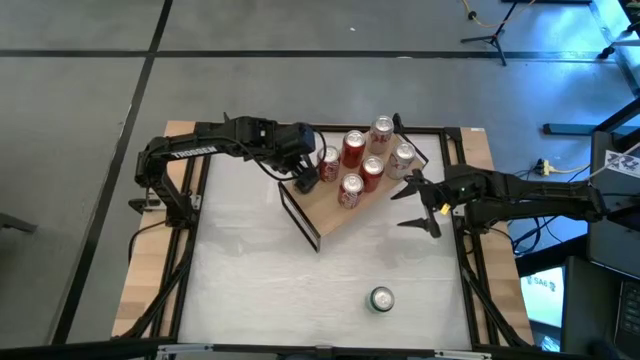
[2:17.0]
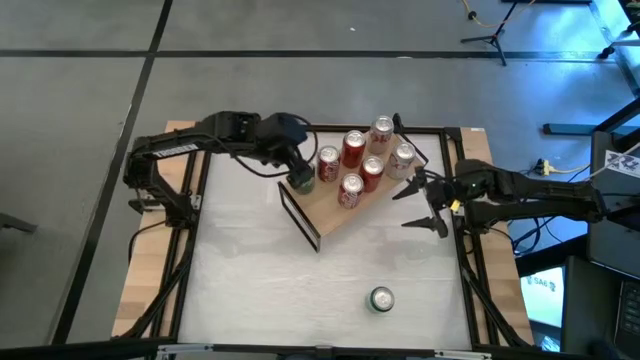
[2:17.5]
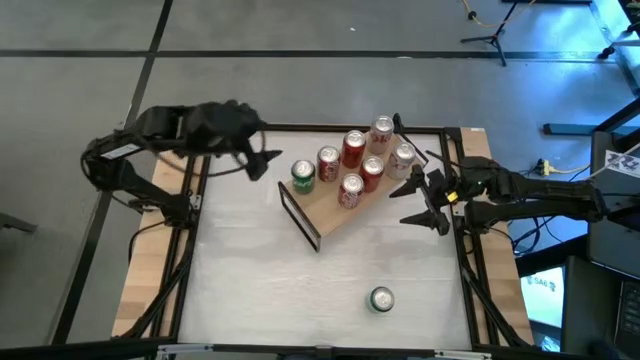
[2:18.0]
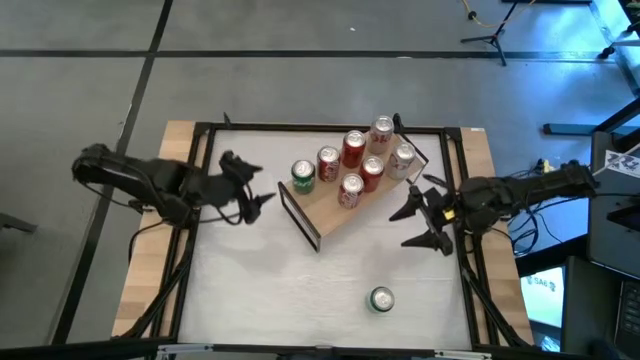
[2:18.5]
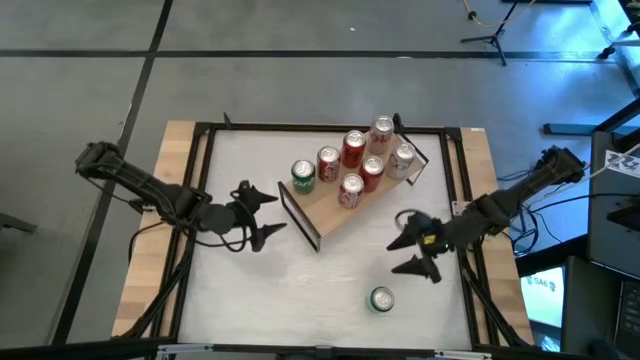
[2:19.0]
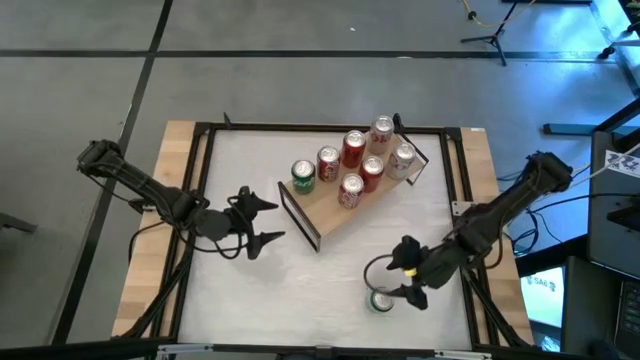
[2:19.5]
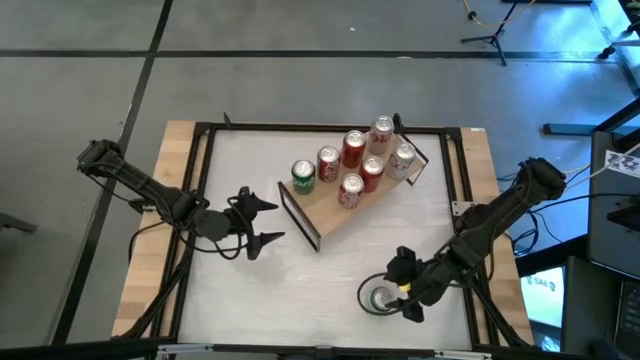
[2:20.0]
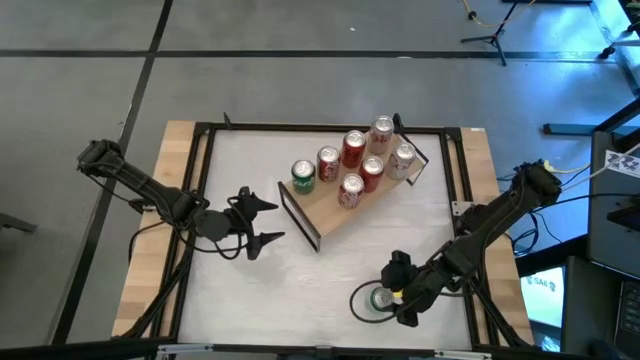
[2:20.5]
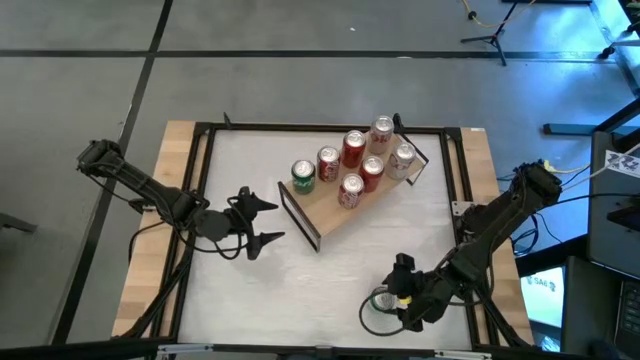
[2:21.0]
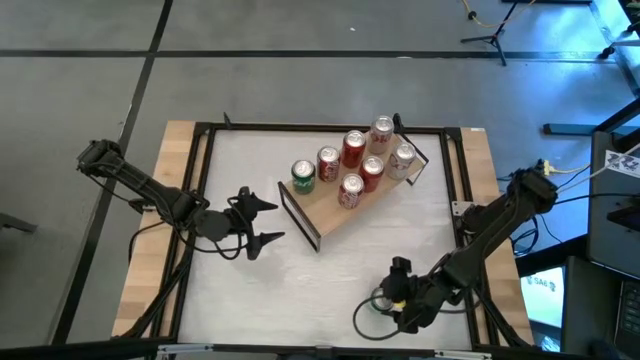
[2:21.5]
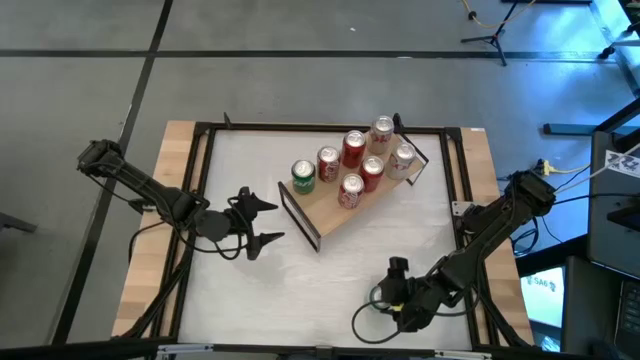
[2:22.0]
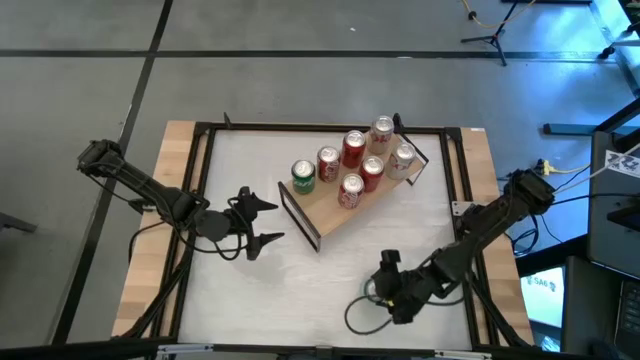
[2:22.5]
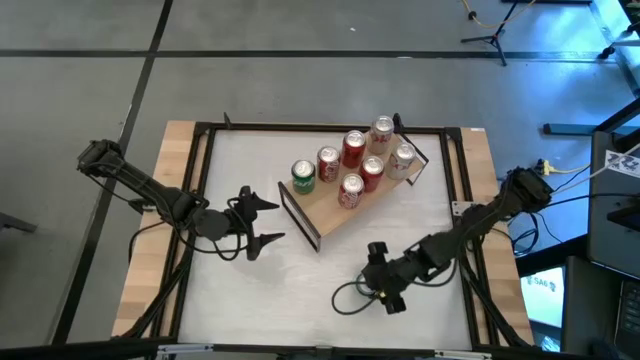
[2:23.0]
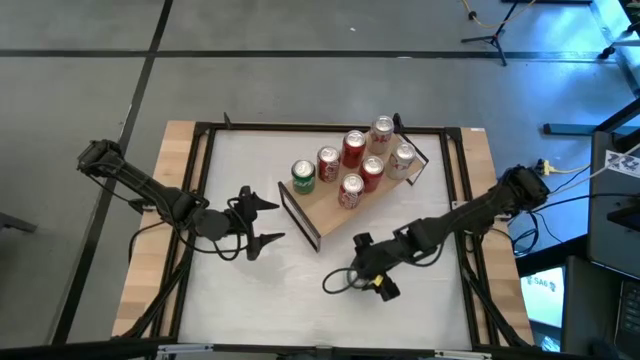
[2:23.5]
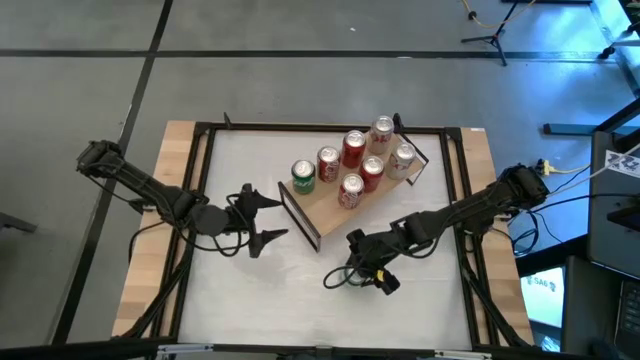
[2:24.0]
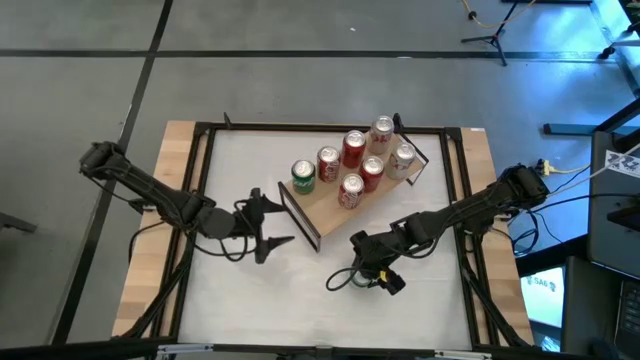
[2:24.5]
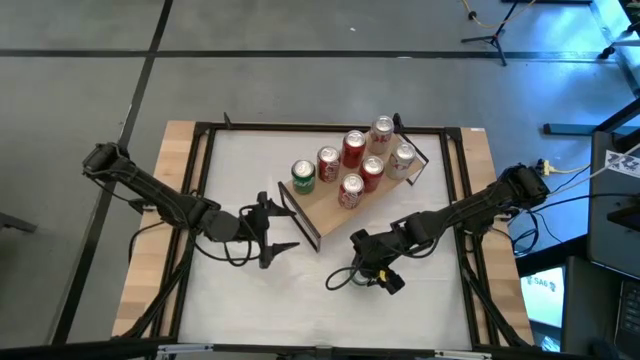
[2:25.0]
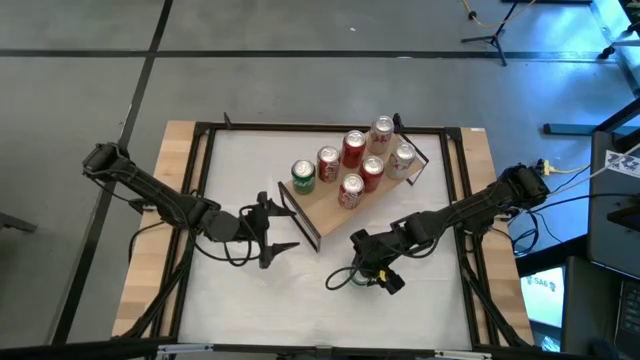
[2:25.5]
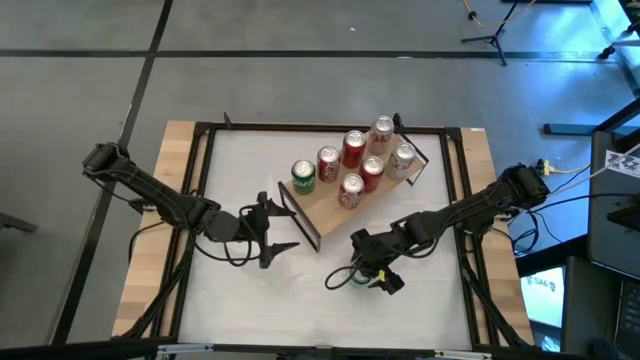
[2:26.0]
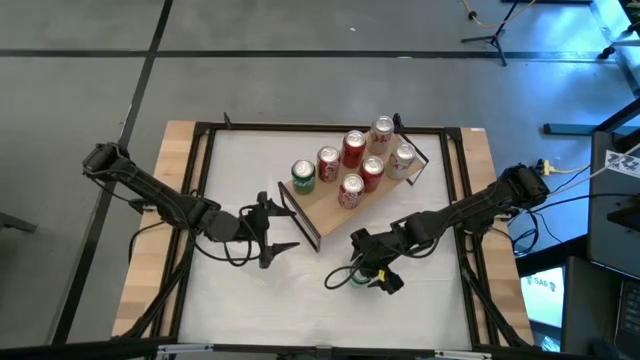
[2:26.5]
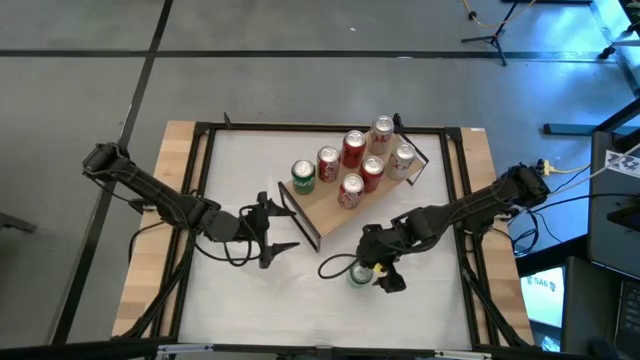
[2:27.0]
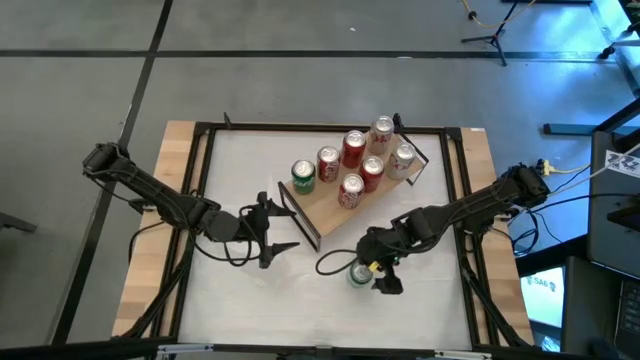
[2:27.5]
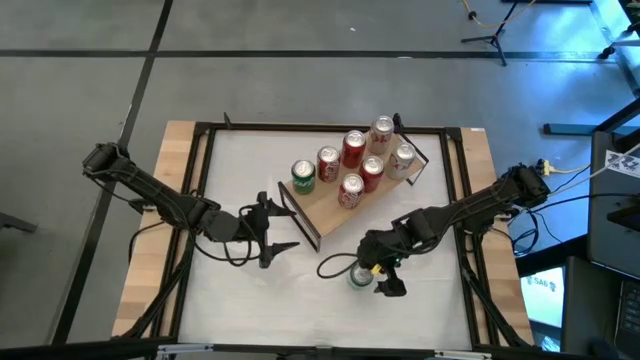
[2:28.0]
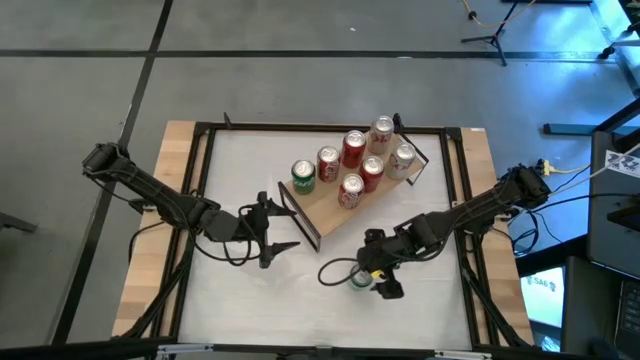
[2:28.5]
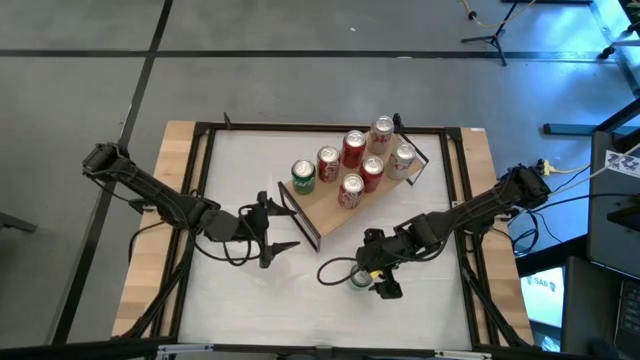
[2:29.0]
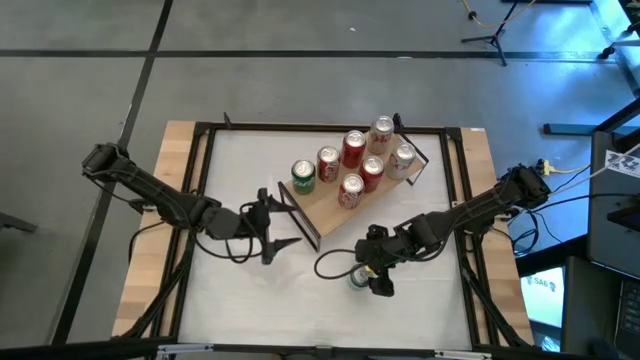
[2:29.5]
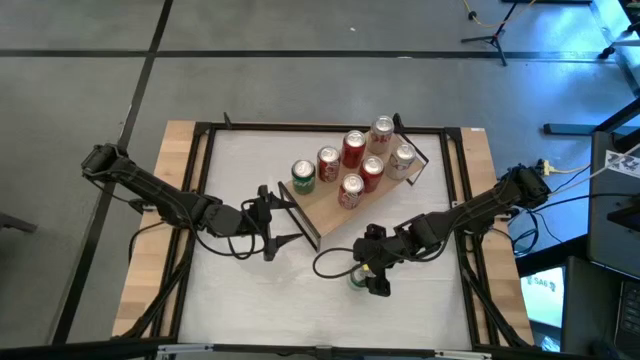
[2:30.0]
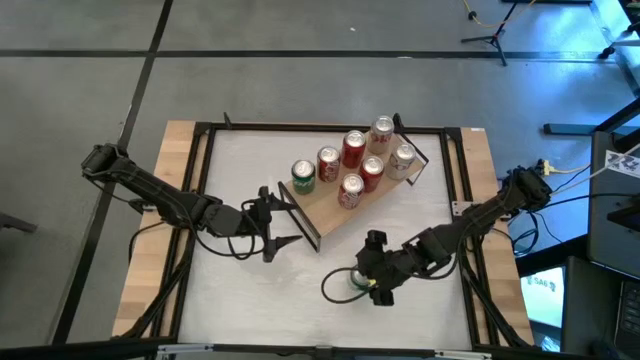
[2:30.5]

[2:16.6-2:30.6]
Task: Place canned beverage on shelf
Put the green soda can on the shelf aligned with the other green soda can

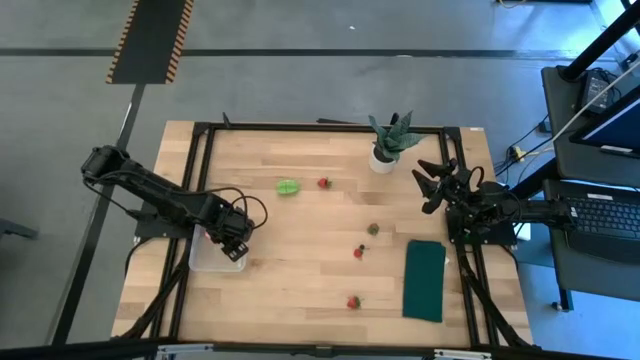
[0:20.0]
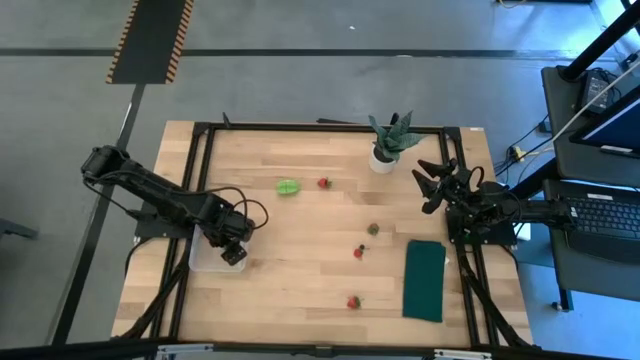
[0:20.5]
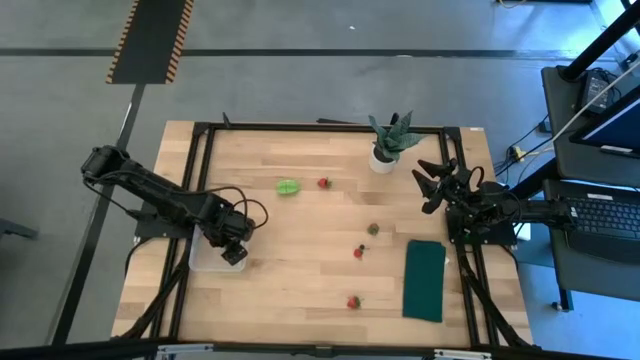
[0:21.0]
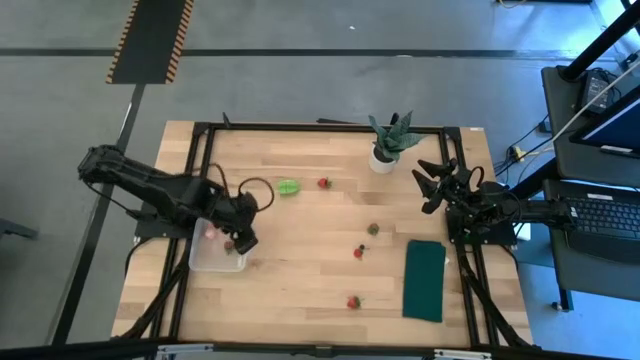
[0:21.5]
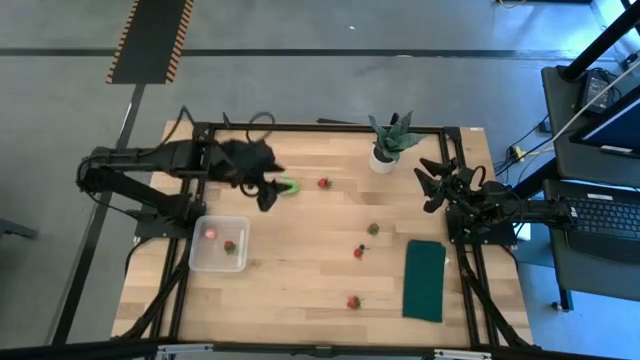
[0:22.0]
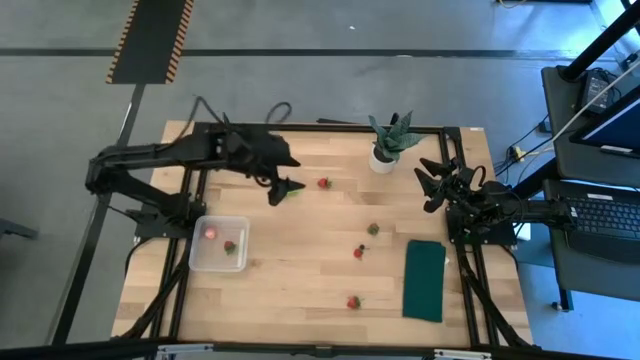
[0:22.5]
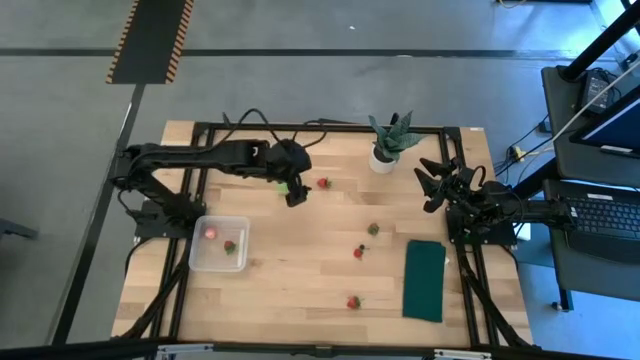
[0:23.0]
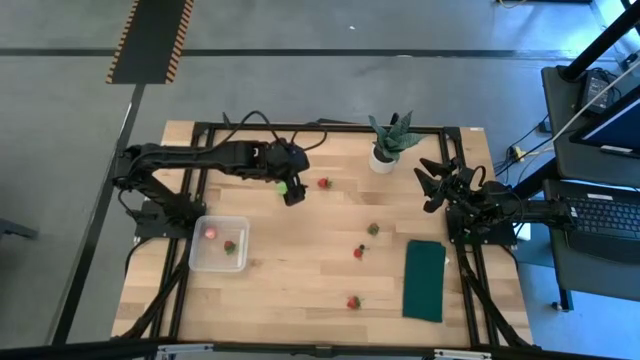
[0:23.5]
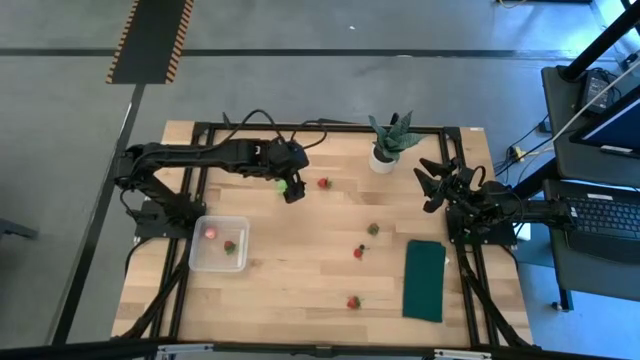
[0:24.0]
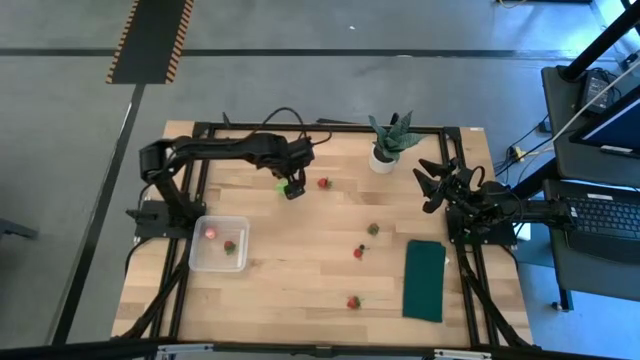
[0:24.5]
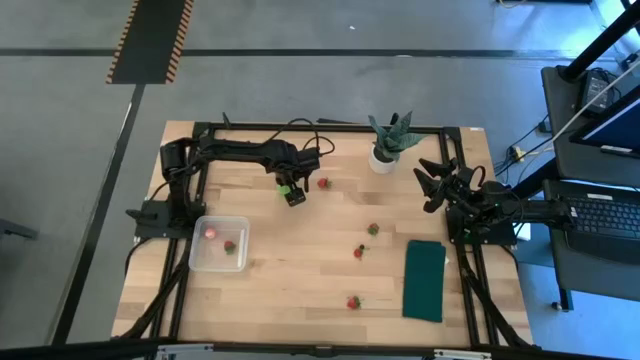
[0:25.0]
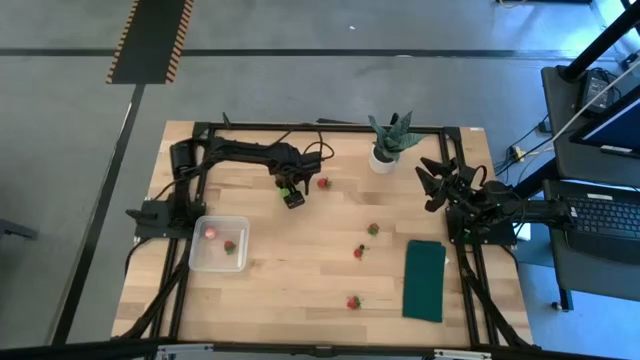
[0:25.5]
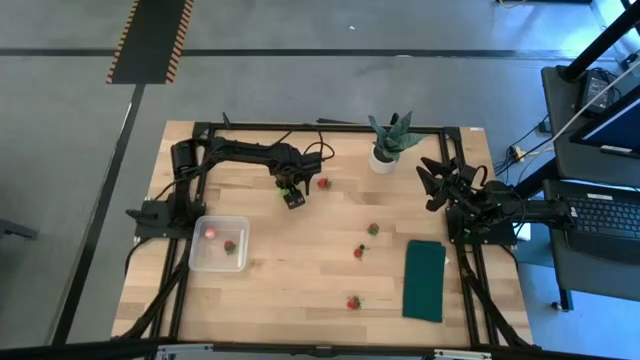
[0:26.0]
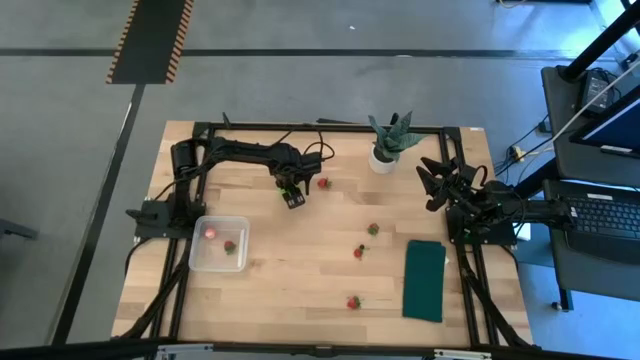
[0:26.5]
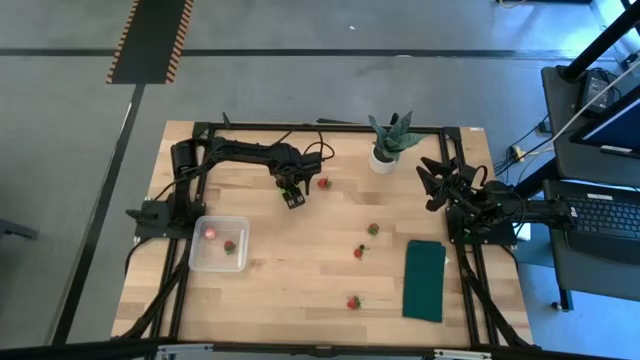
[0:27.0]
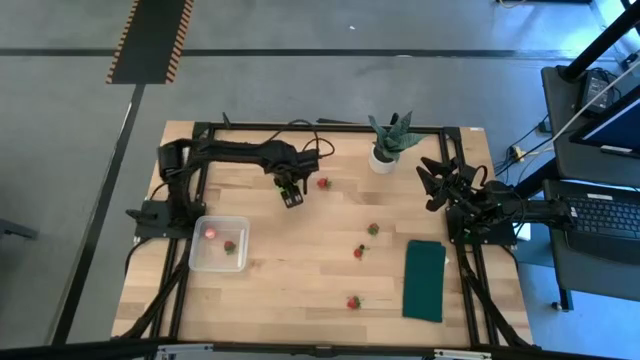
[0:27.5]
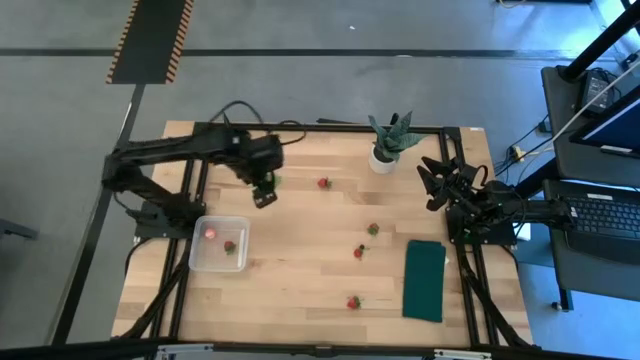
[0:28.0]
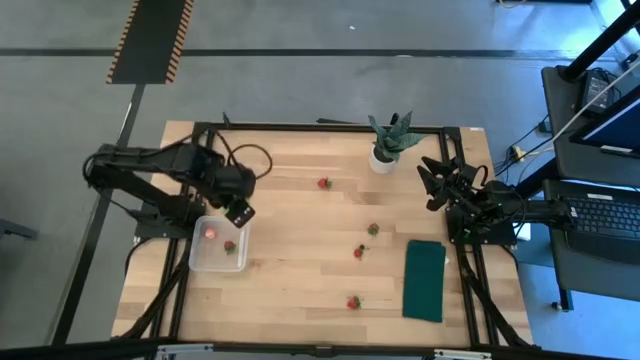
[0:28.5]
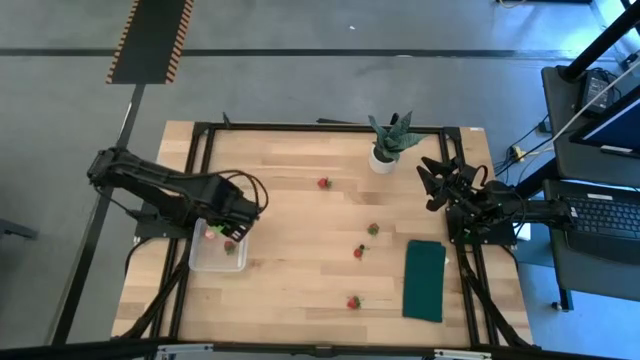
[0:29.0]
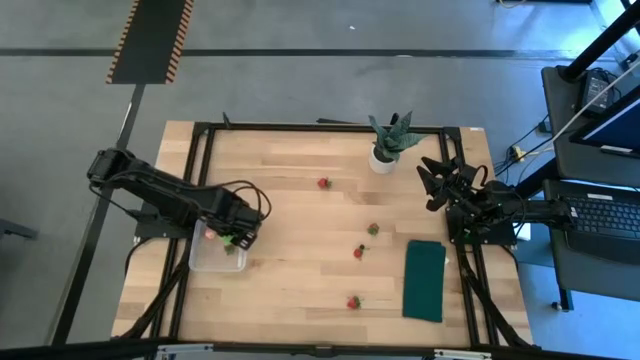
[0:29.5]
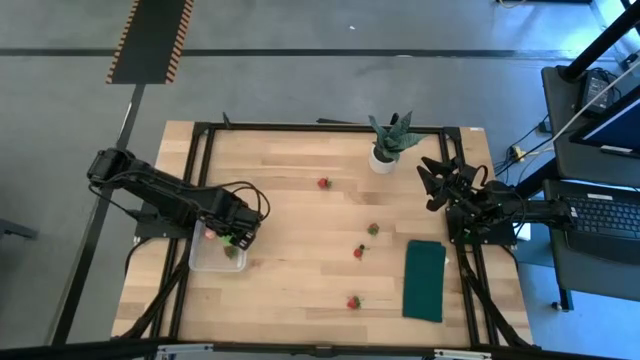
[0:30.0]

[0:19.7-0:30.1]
Task: Pick and placing Produce into tupperware
Put the green starfruit into the transparent bin
